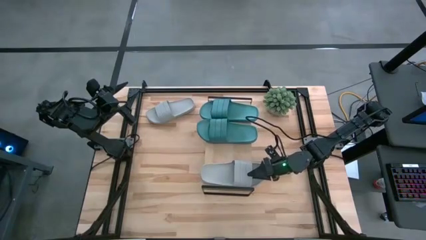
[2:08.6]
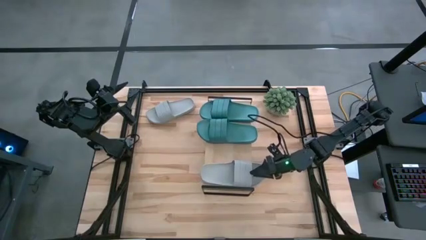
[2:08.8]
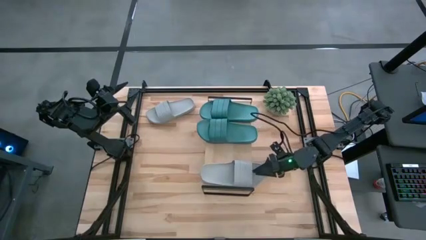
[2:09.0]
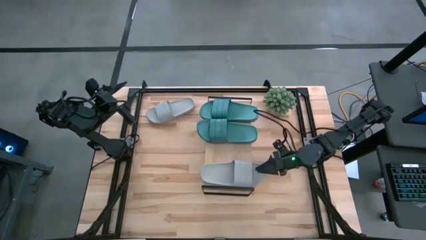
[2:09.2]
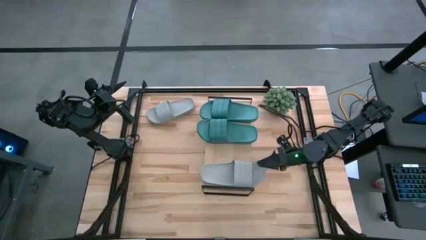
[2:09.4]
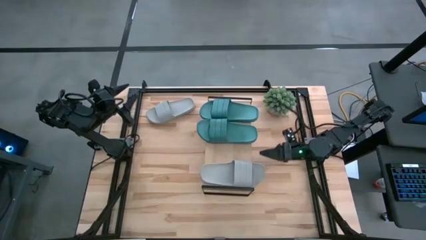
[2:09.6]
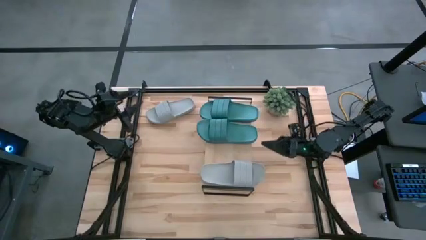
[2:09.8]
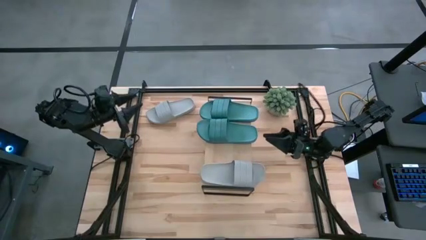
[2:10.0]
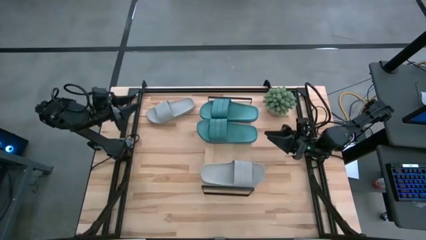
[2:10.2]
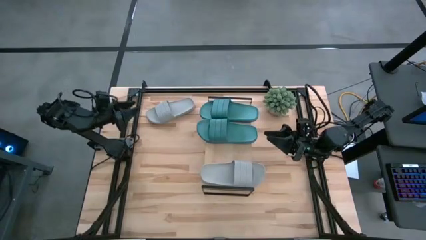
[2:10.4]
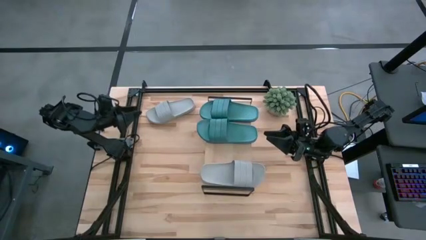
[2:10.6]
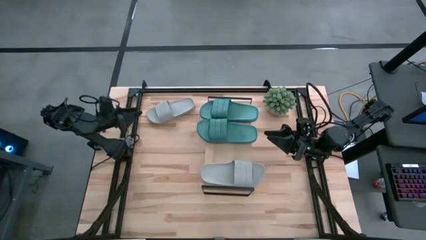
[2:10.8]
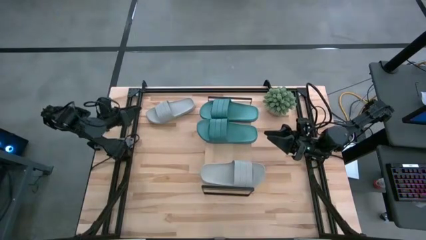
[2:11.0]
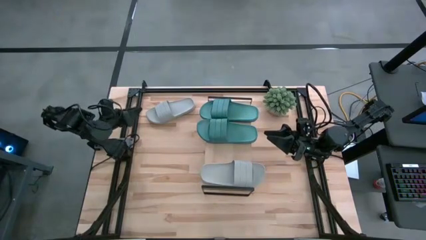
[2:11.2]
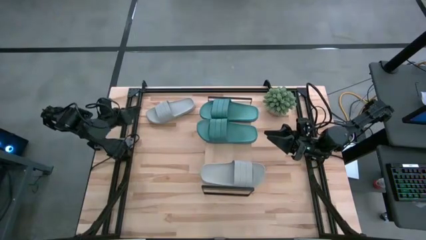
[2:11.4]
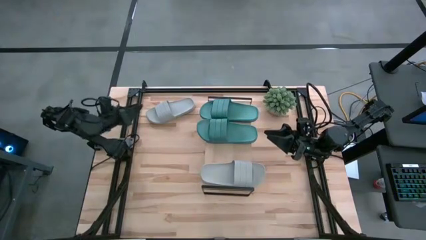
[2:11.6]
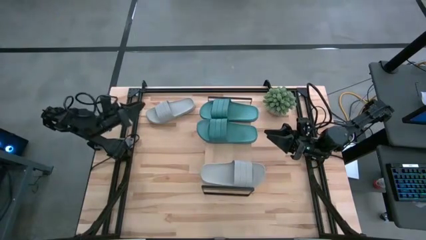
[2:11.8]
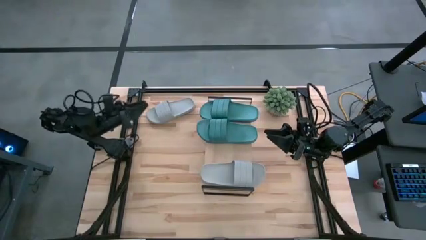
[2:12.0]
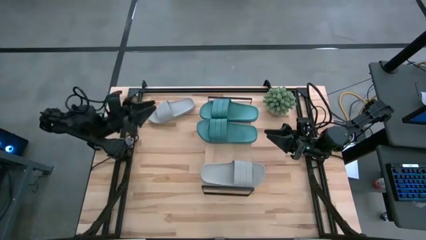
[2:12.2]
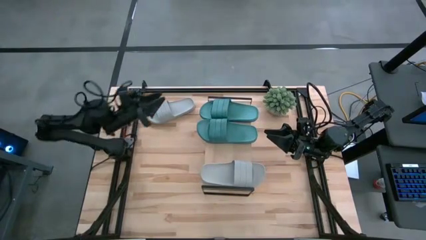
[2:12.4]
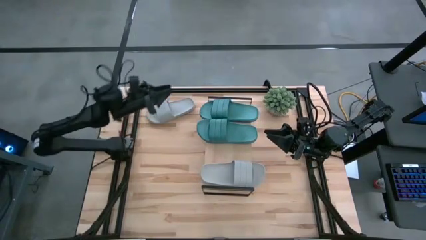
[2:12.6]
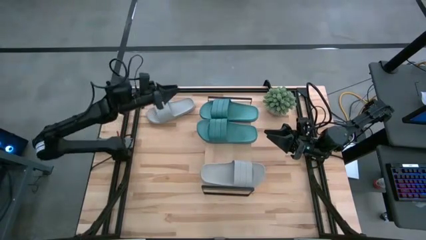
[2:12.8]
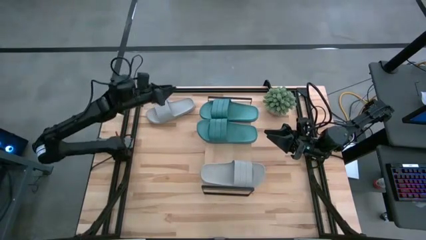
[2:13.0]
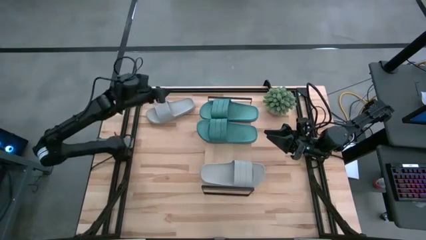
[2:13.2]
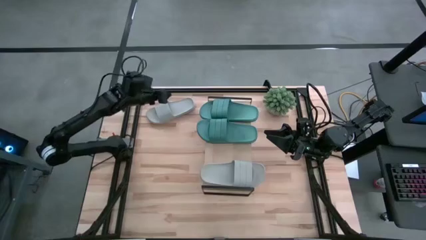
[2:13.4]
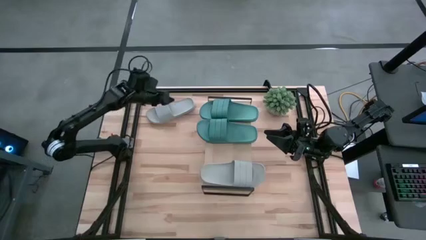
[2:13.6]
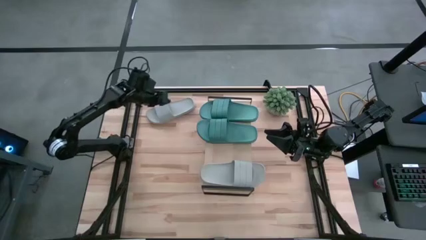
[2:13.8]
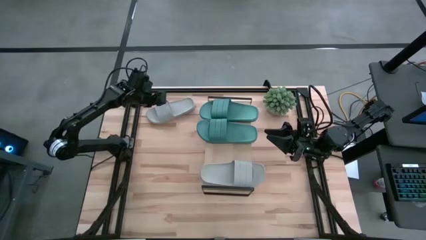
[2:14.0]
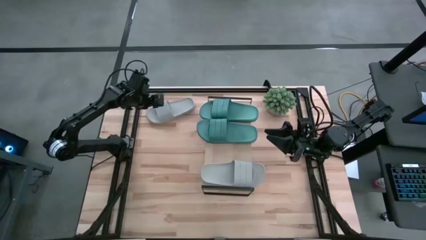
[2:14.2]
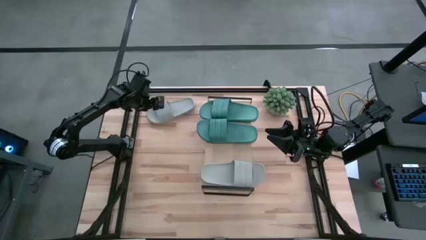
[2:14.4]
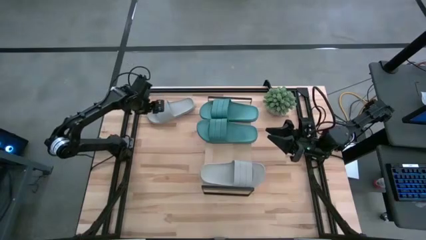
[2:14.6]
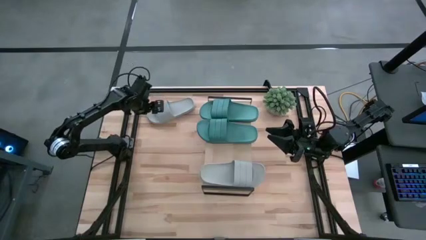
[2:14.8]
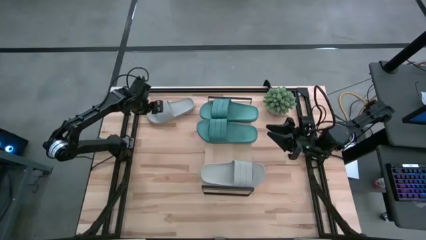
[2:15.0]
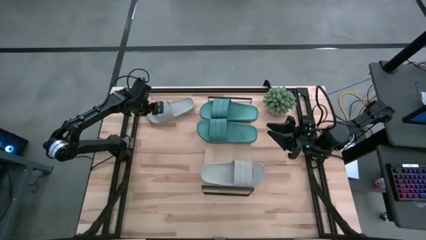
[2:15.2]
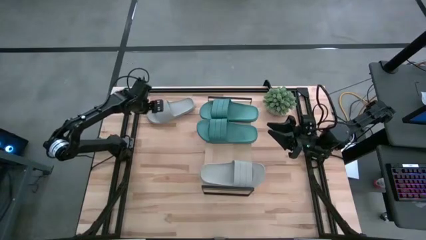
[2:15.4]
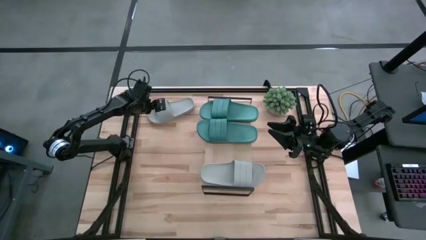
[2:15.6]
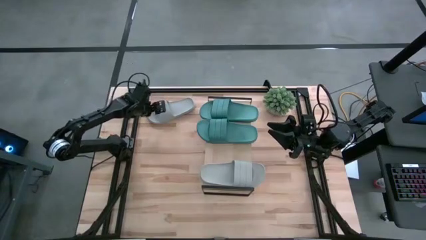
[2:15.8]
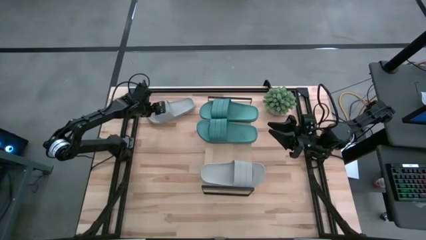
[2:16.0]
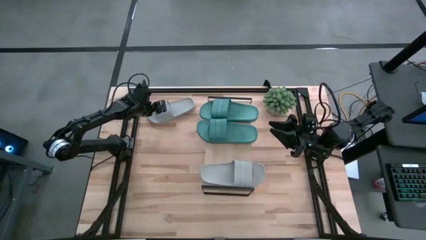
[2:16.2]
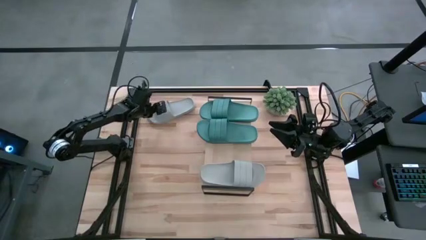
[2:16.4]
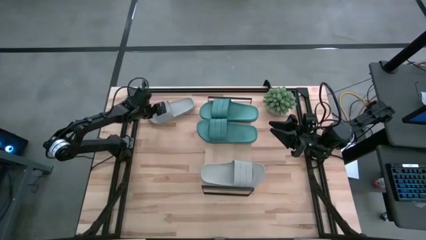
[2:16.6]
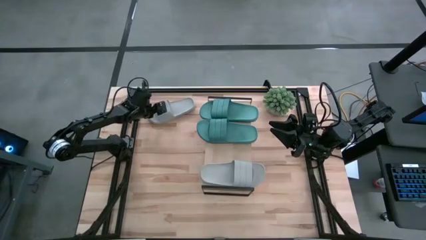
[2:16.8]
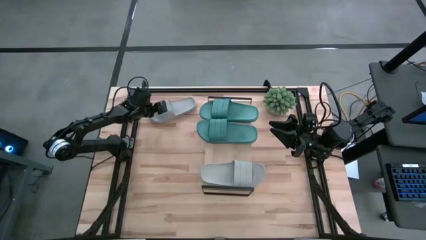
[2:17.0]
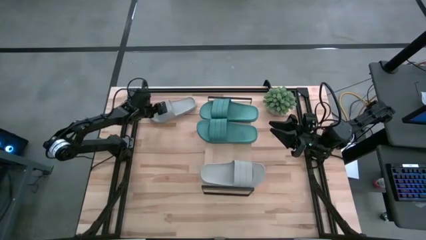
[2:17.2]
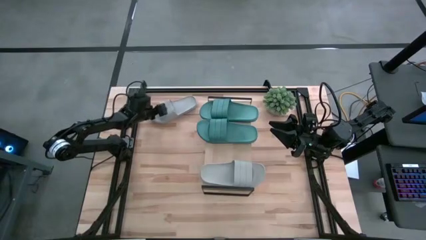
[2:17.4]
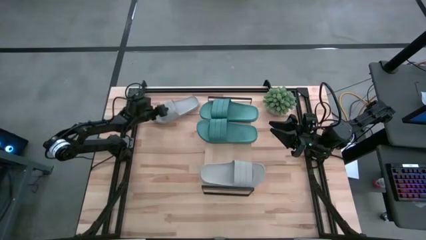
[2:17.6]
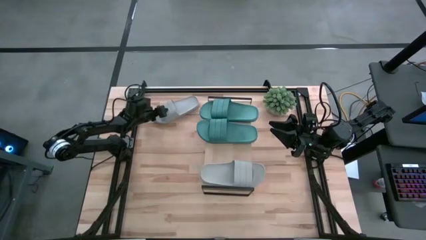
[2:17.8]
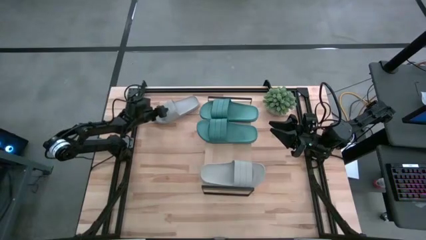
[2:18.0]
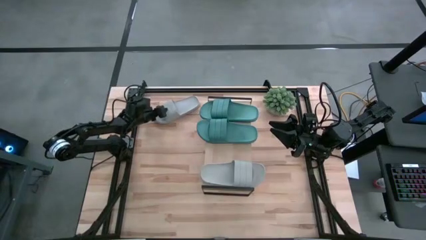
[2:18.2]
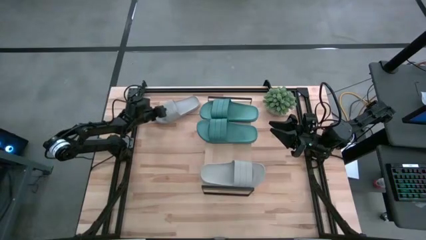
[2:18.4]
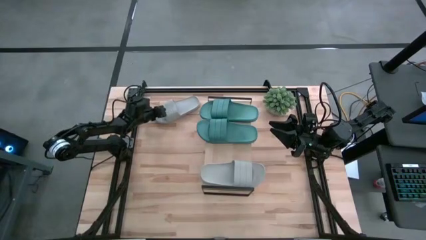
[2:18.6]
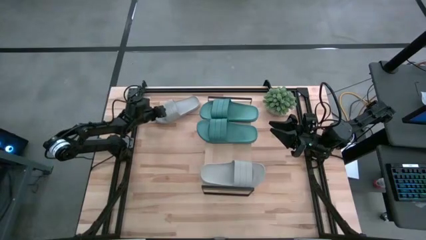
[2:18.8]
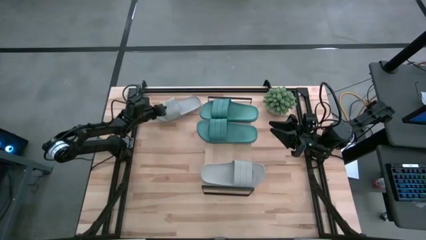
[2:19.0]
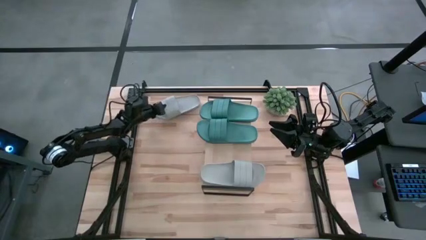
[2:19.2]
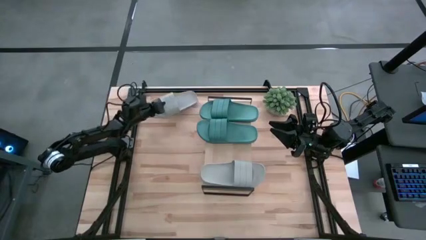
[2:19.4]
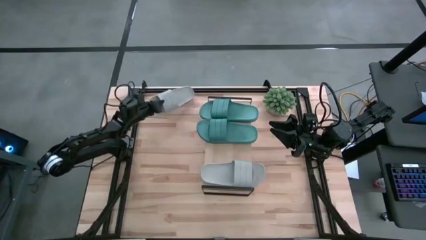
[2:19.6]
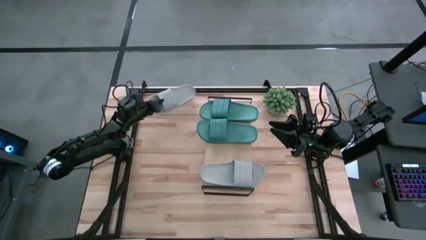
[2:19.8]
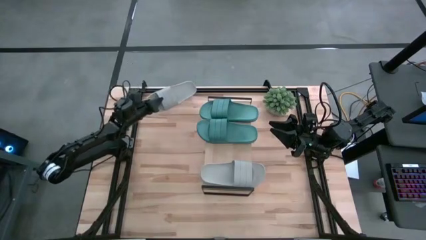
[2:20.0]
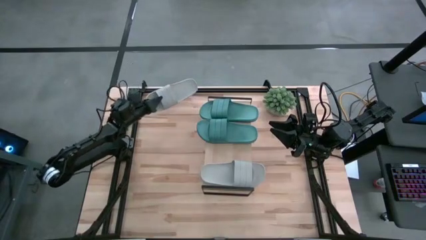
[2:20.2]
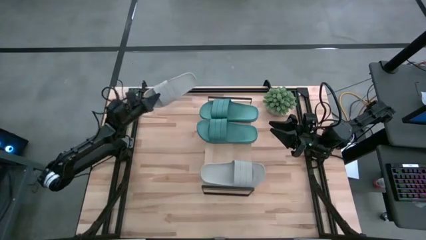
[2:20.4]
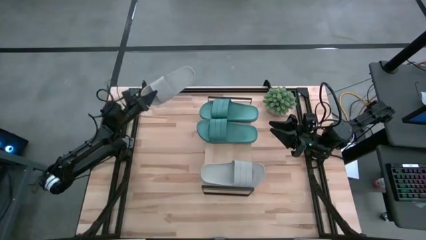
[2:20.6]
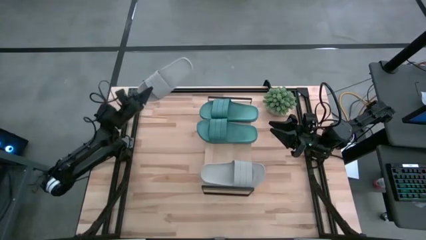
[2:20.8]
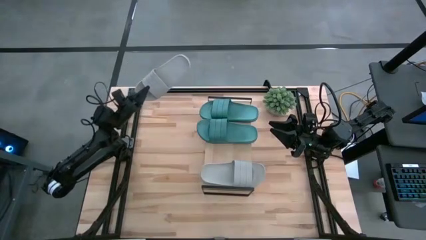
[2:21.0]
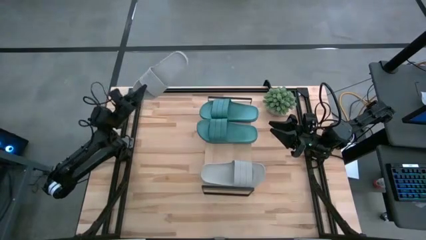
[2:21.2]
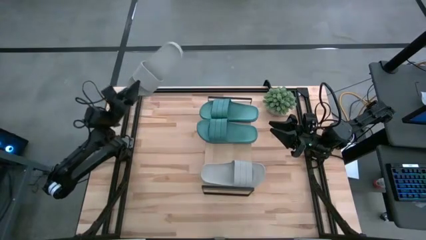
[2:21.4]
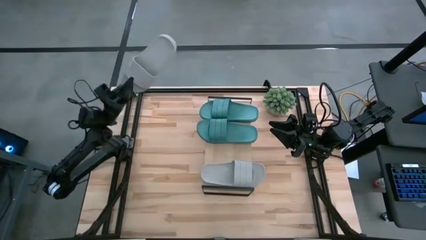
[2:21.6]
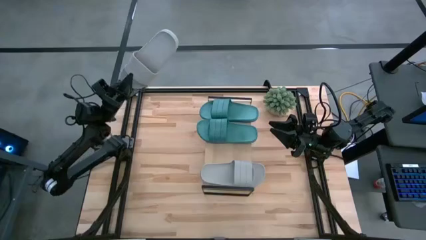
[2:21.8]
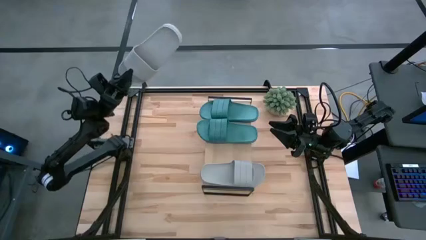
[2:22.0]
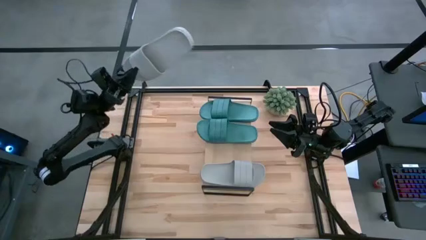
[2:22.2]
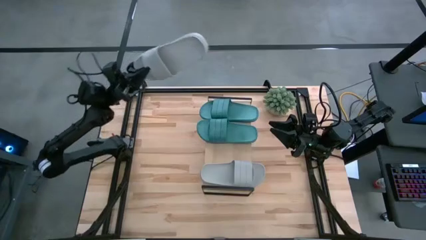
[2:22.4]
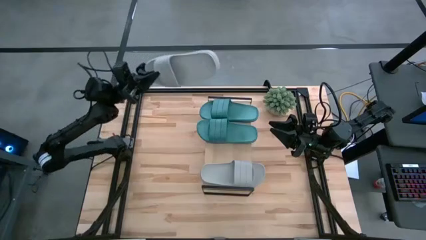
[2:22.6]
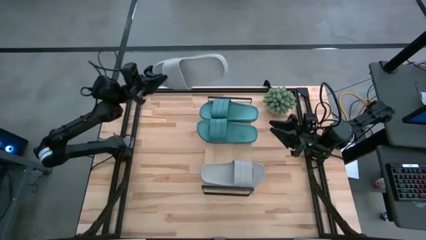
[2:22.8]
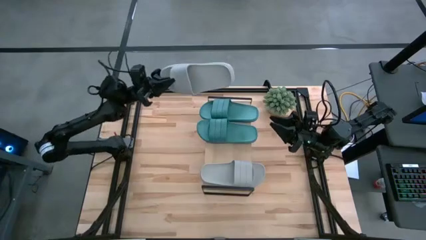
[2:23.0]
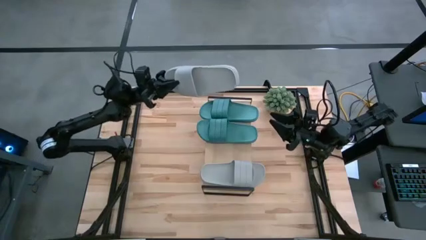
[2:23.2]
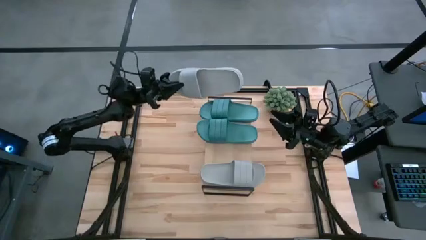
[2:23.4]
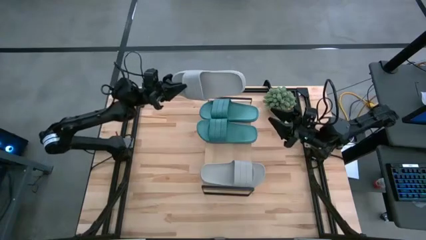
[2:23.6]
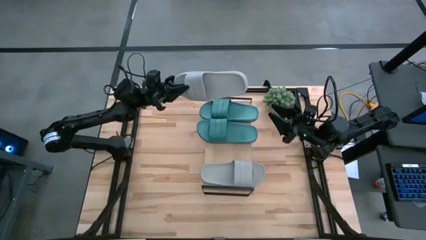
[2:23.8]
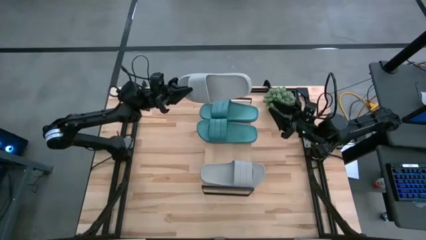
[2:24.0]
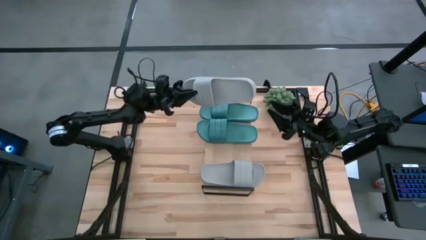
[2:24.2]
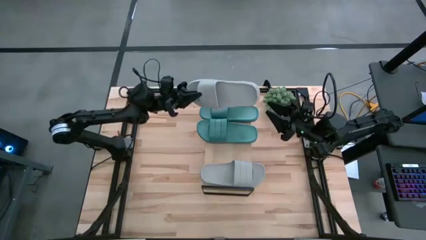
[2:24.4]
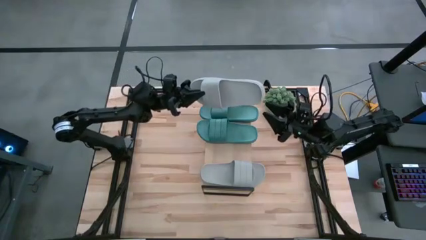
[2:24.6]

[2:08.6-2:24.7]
Task: Pick and place slides into the shelf
Put the gray slide on the shelf
